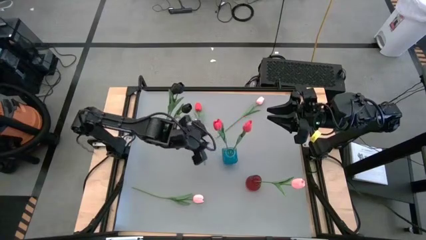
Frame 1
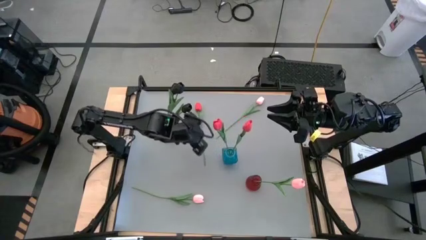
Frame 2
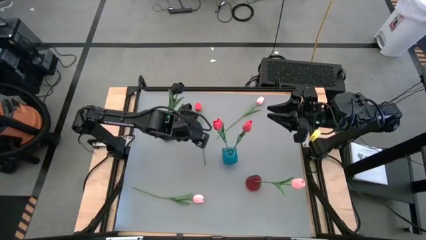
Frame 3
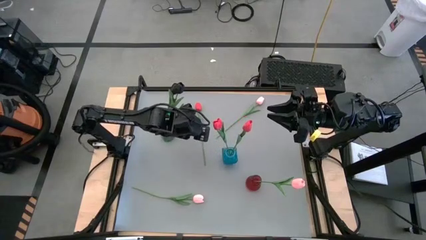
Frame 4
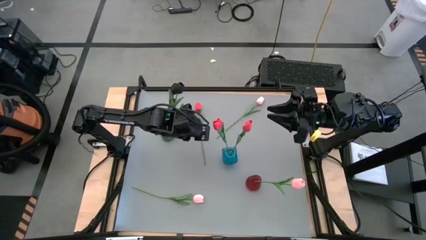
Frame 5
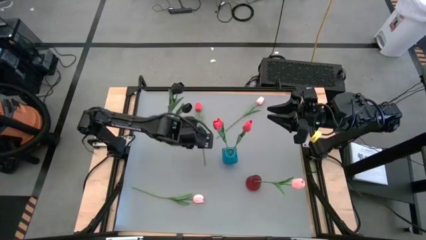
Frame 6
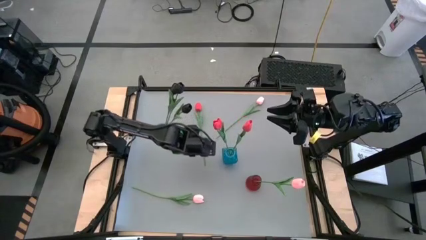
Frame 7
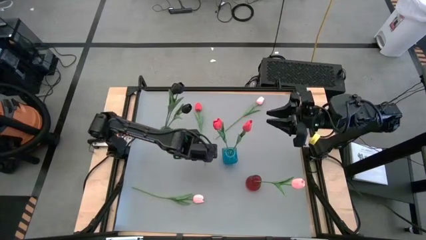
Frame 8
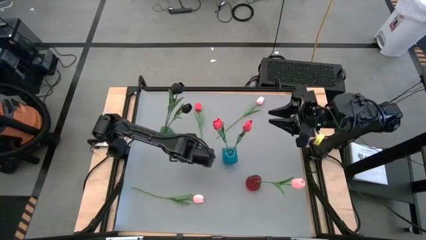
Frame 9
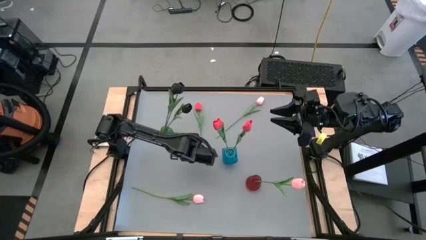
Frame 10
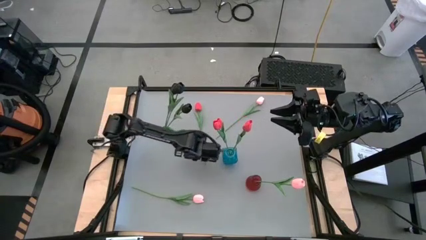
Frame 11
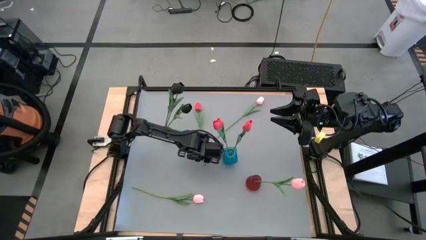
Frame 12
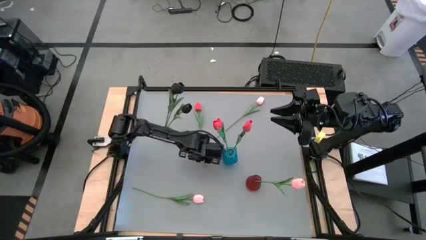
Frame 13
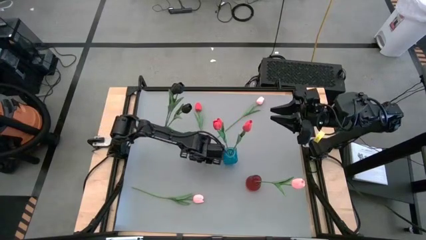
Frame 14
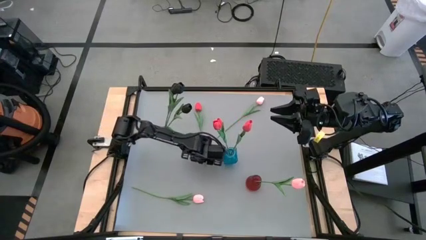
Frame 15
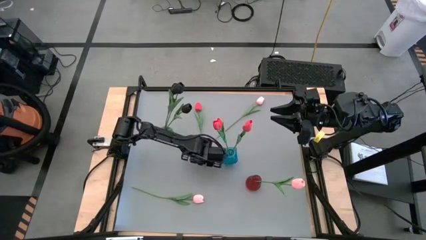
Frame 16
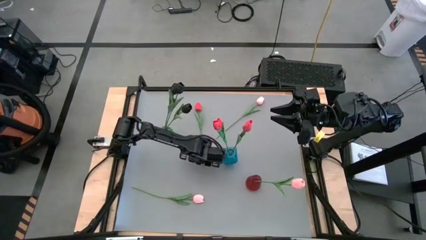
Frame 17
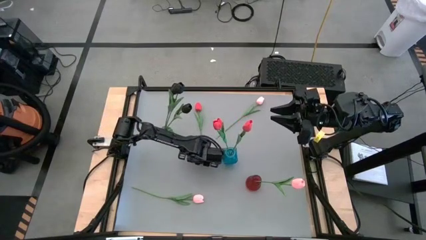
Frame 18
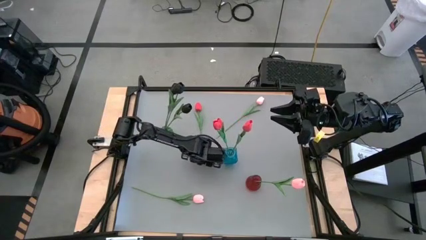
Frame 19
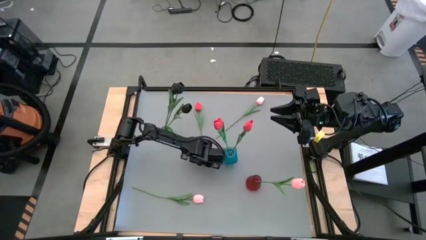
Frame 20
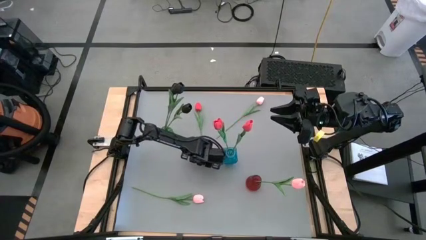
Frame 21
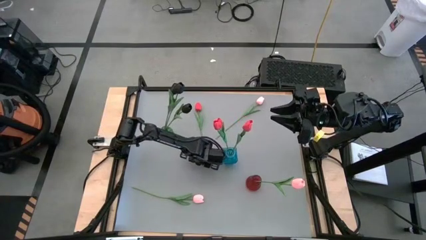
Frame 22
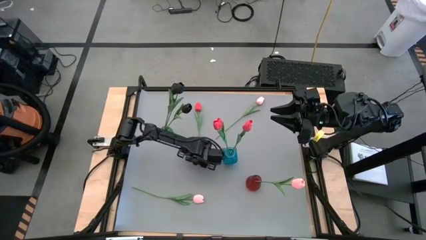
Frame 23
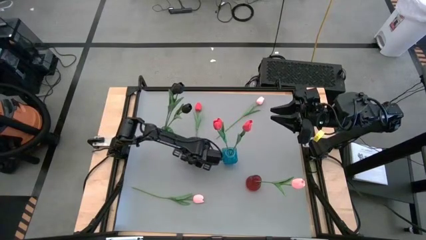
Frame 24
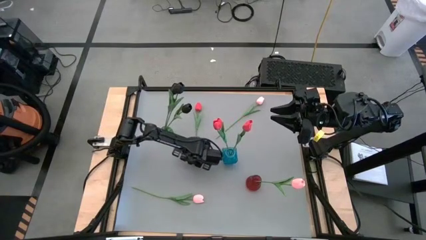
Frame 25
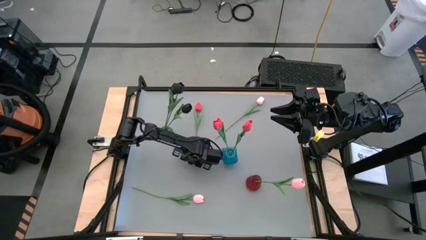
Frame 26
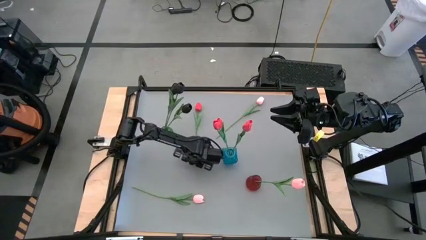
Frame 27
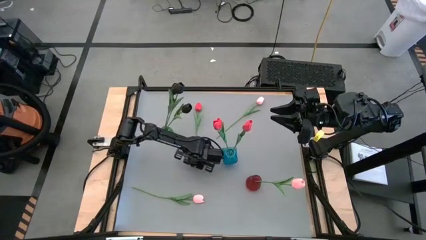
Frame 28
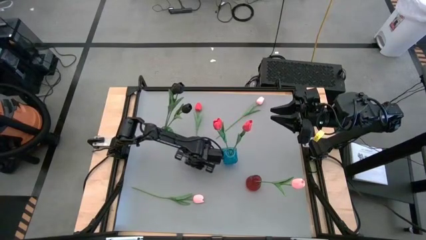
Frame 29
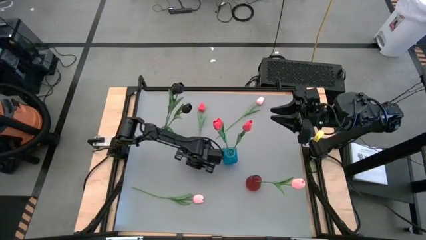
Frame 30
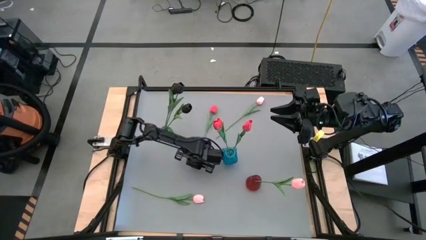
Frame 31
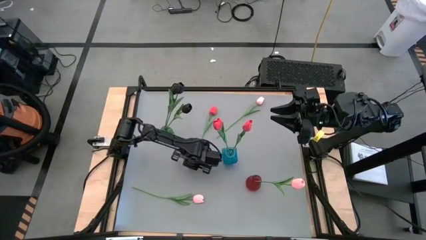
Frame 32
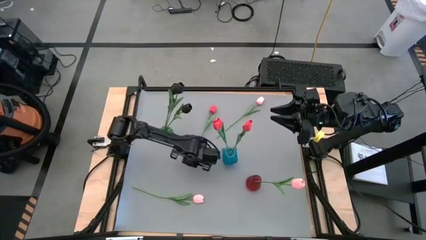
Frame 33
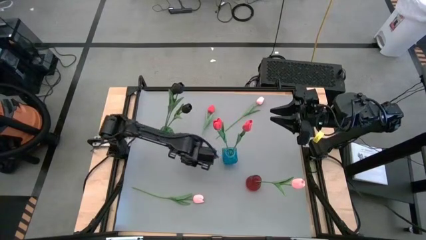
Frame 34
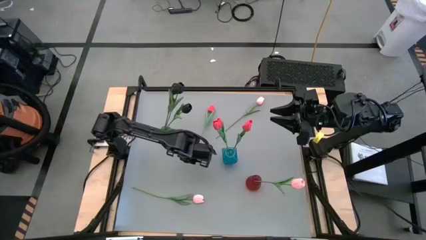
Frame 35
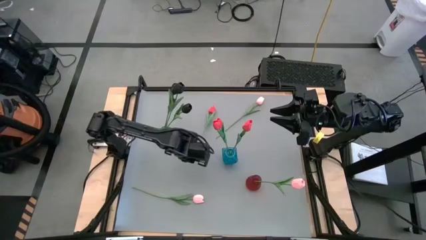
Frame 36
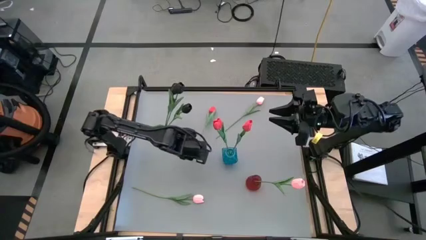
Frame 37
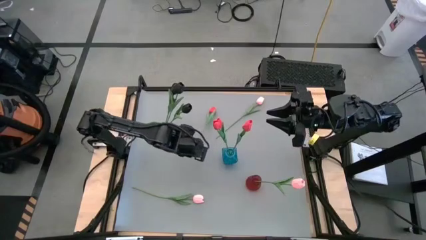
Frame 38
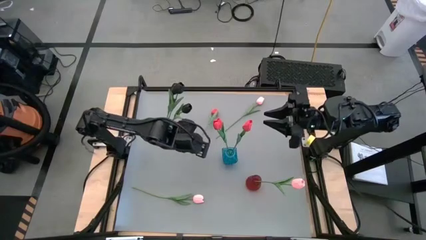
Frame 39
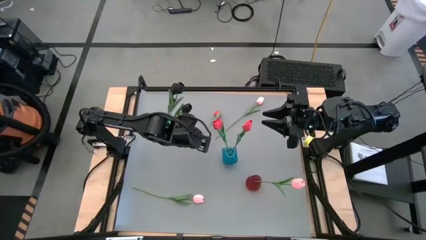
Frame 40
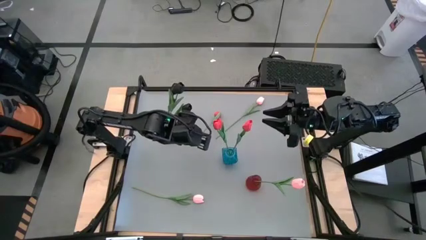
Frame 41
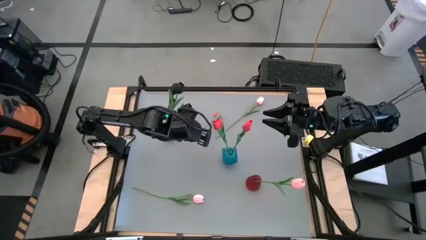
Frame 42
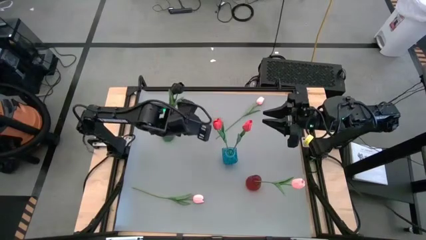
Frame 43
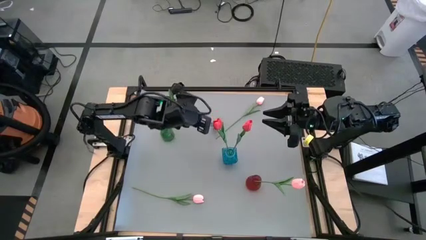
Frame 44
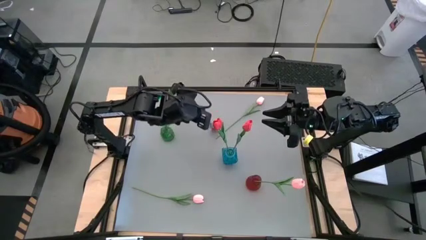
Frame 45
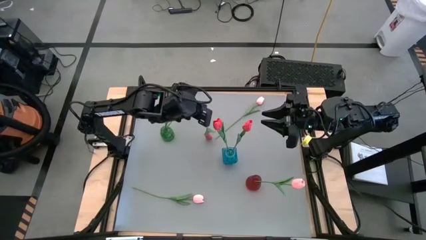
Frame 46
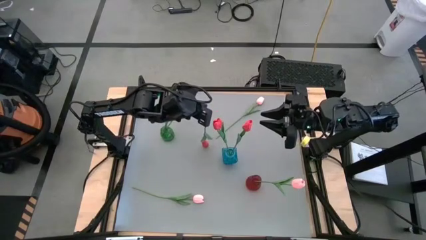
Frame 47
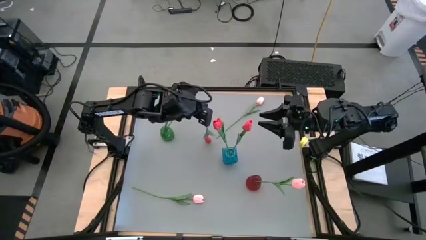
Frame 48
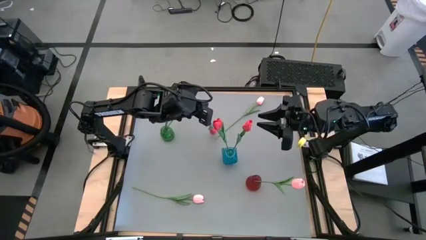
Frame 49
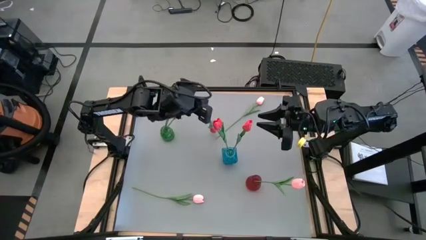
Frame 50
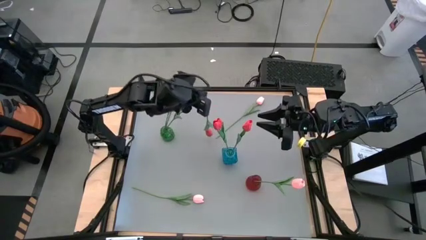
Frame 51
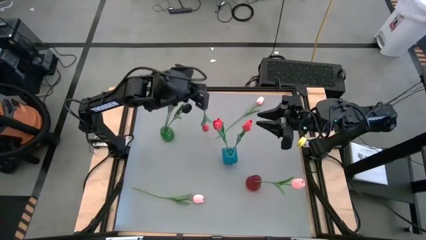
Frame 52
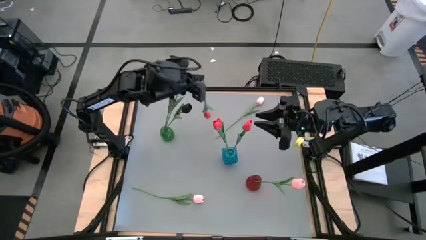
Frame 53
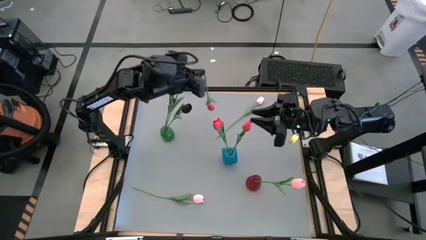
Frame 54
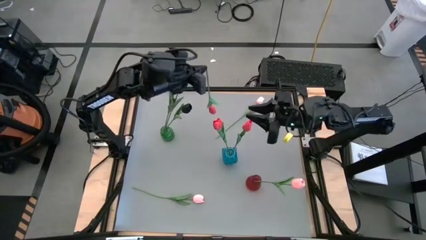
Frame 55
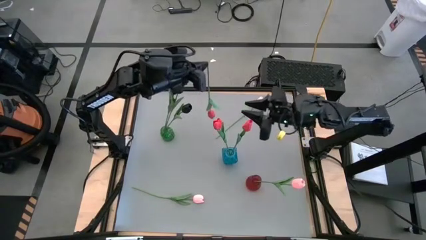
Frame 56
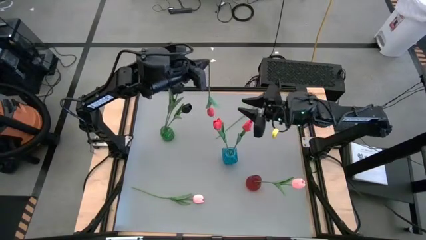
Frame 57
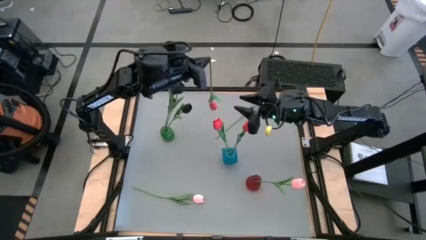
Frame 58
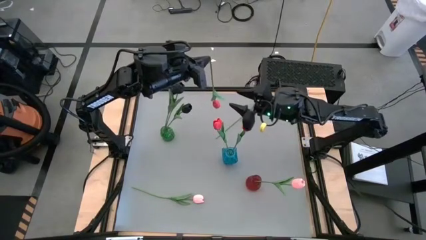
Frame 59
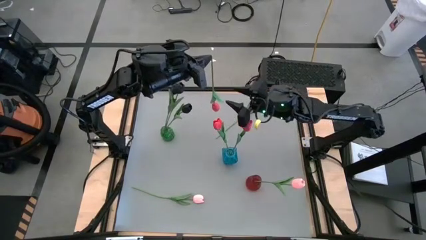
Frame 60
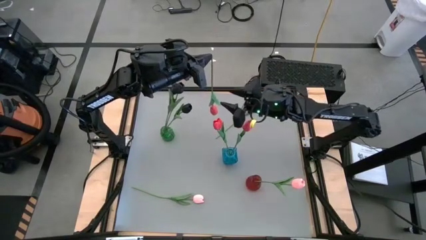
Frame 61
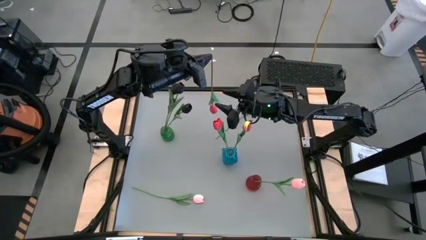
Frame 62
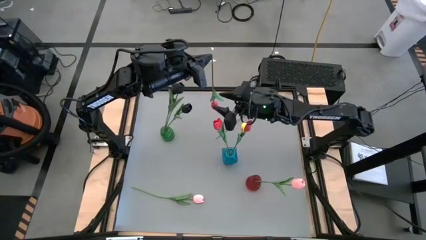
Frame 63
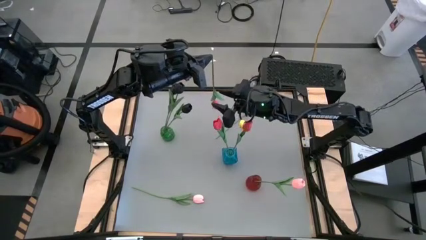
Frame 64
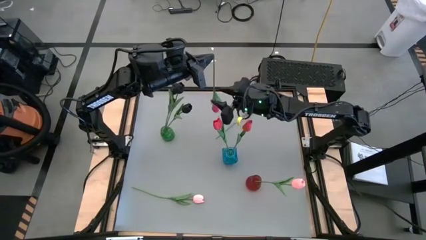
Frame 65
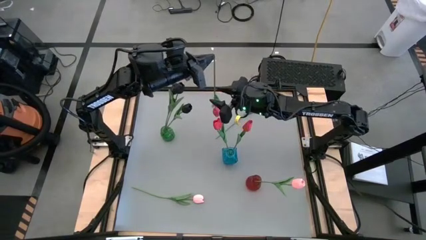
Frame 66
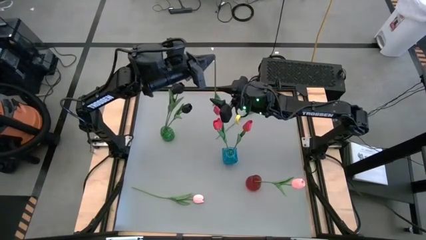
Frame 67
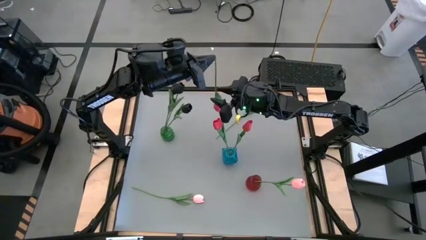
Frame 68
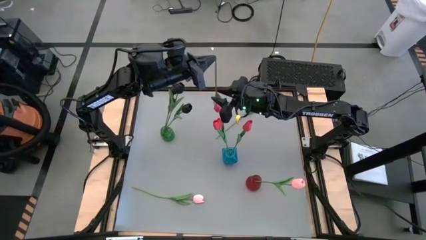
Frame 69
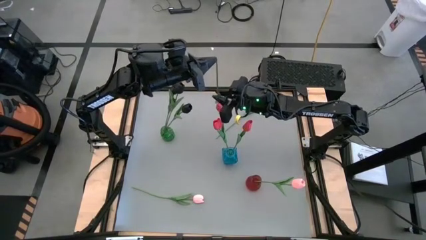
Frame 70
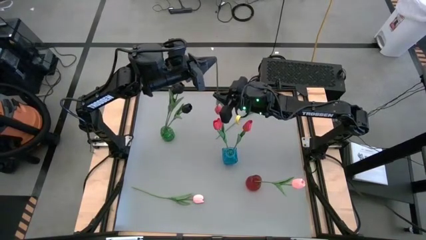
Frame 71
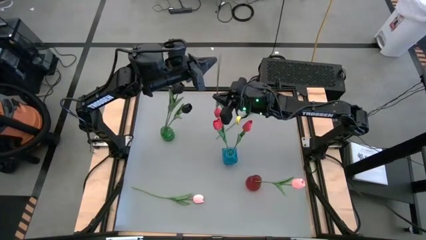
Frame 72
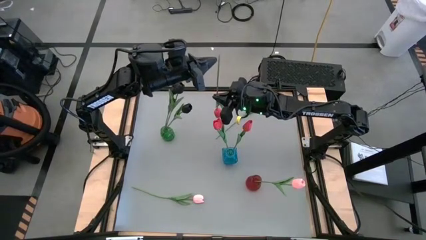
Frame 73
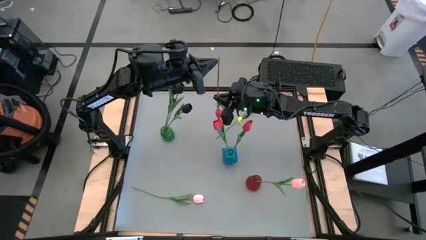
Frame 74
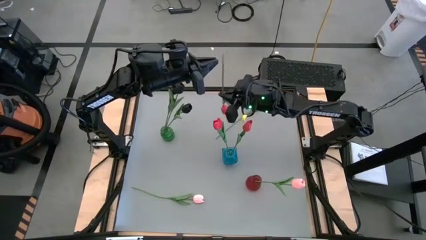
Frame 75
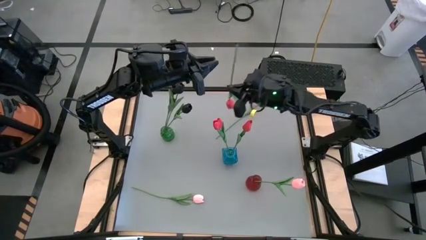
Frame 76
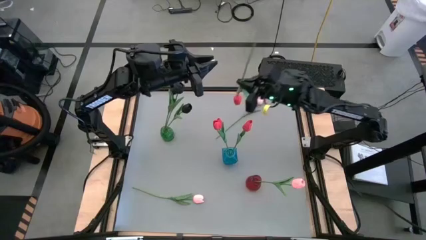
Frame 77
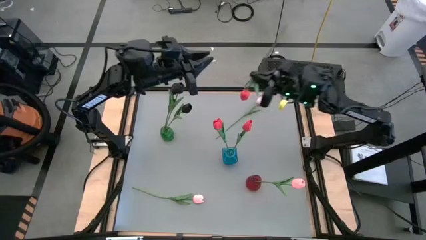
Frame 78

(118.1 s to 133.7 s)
Task: Sort flowers into vase by color
Put the red tulip into the blue vase
